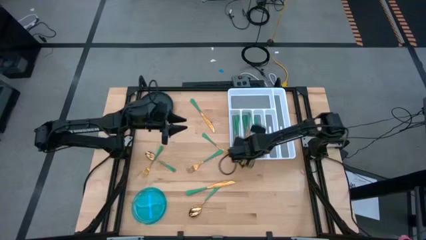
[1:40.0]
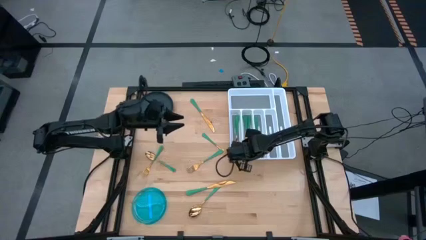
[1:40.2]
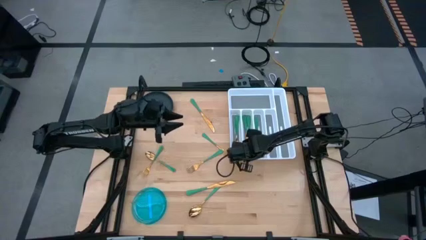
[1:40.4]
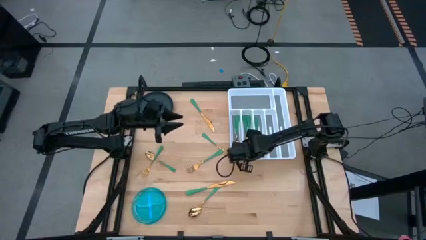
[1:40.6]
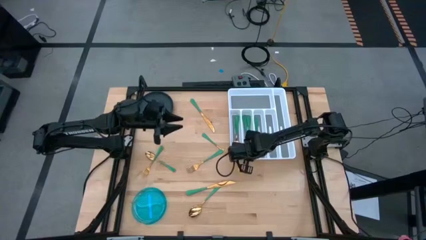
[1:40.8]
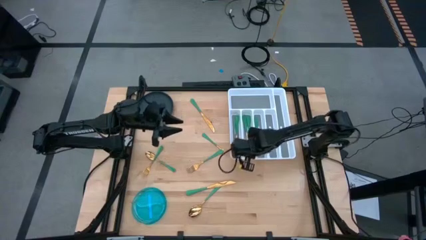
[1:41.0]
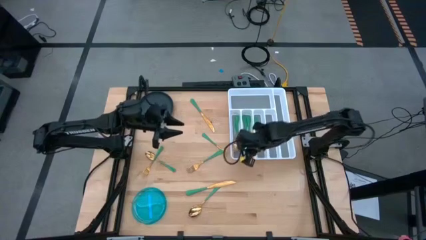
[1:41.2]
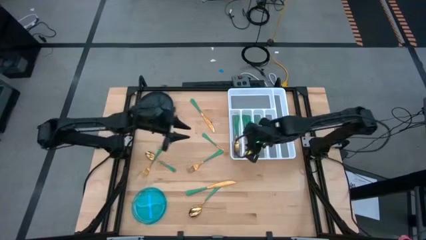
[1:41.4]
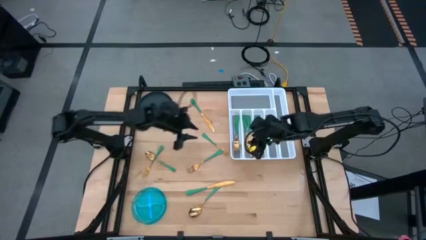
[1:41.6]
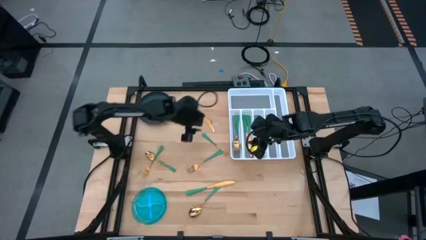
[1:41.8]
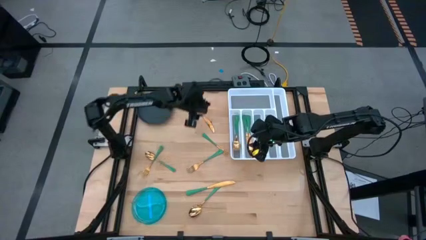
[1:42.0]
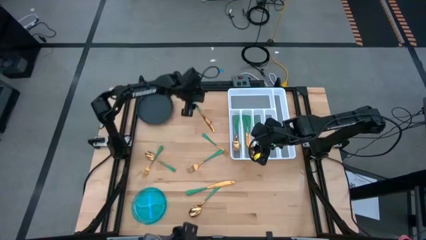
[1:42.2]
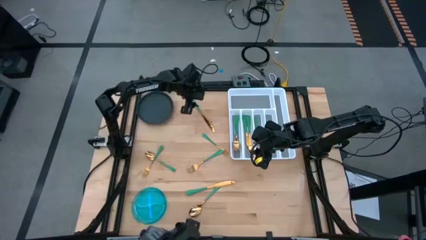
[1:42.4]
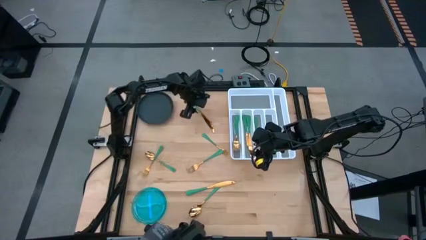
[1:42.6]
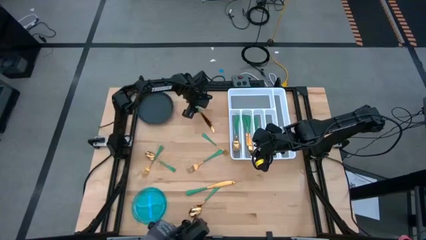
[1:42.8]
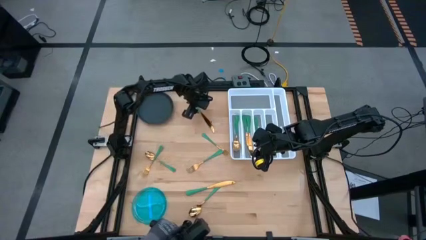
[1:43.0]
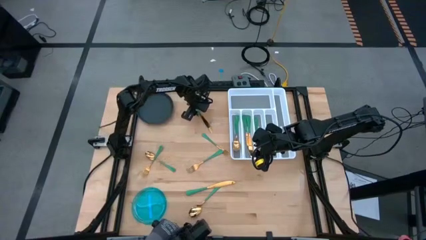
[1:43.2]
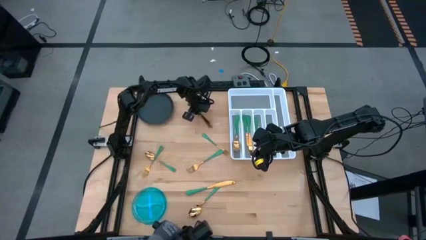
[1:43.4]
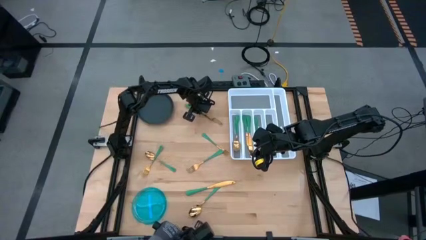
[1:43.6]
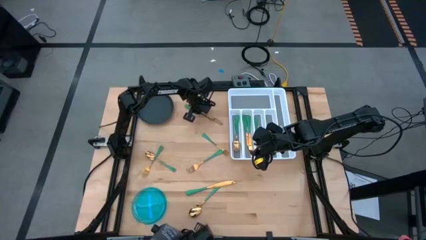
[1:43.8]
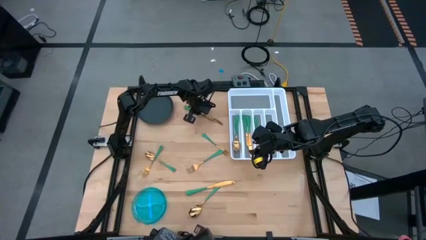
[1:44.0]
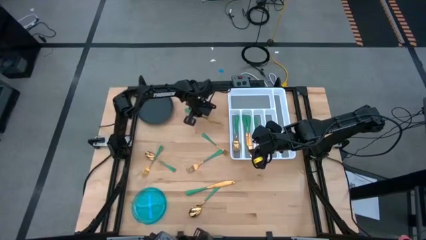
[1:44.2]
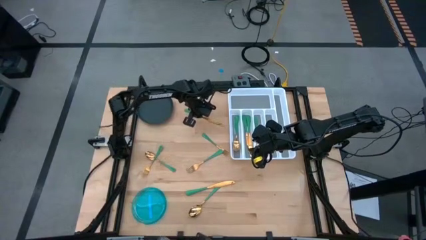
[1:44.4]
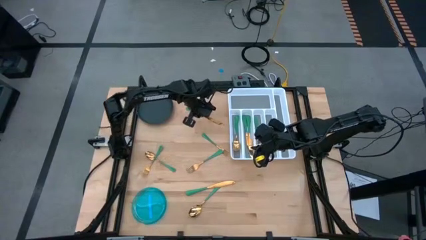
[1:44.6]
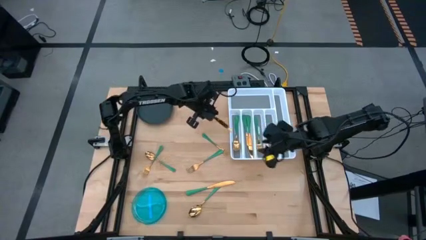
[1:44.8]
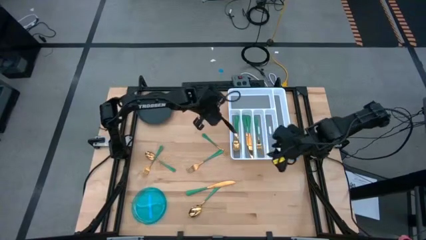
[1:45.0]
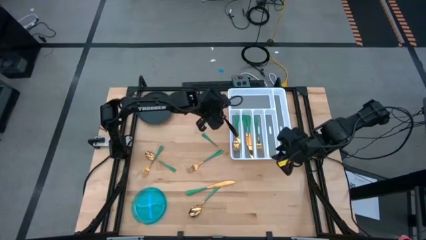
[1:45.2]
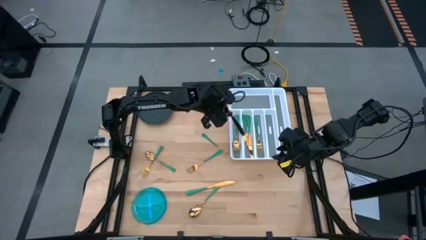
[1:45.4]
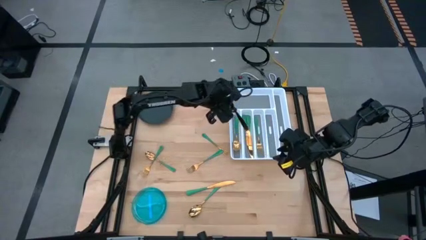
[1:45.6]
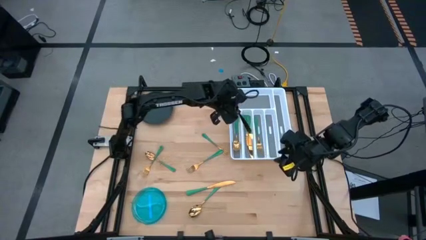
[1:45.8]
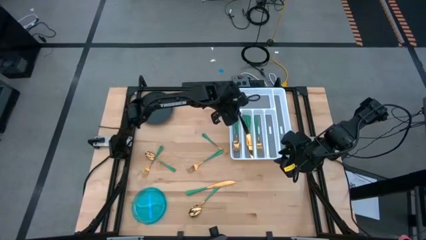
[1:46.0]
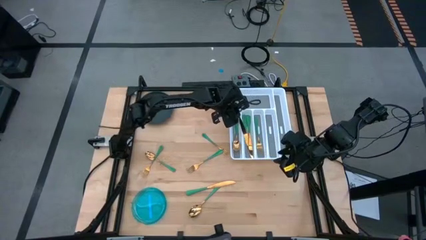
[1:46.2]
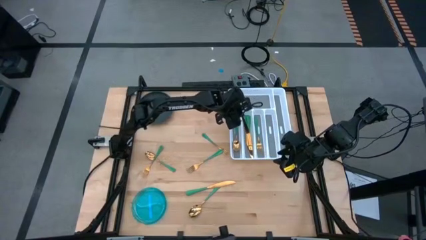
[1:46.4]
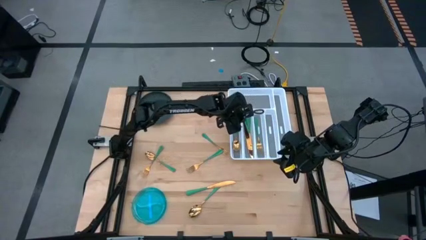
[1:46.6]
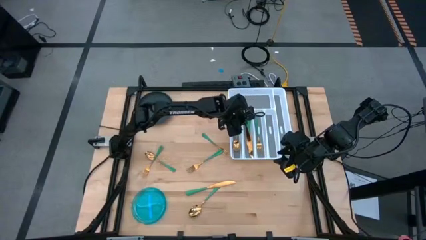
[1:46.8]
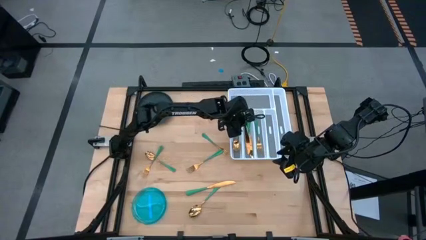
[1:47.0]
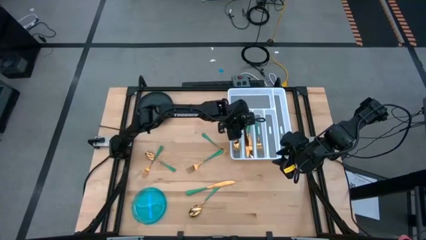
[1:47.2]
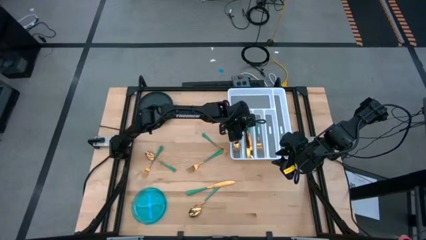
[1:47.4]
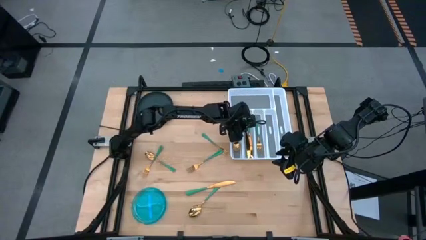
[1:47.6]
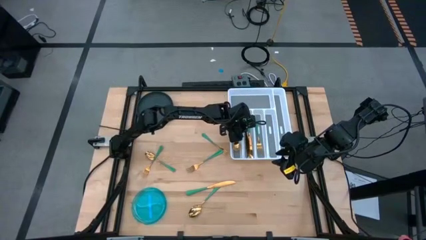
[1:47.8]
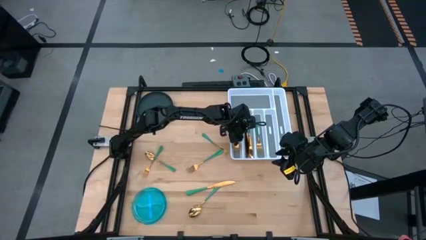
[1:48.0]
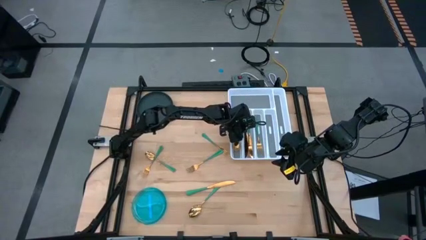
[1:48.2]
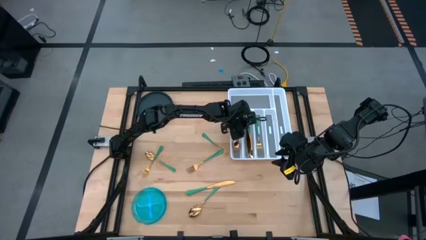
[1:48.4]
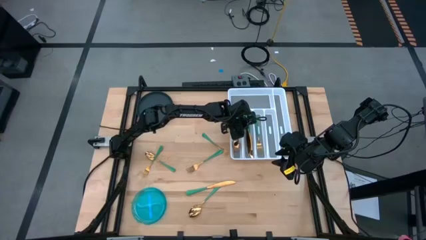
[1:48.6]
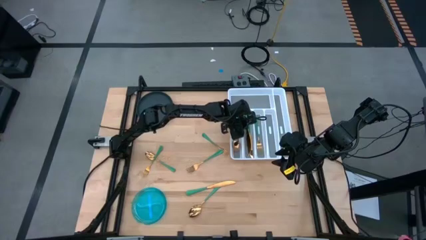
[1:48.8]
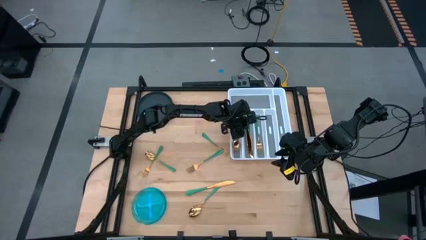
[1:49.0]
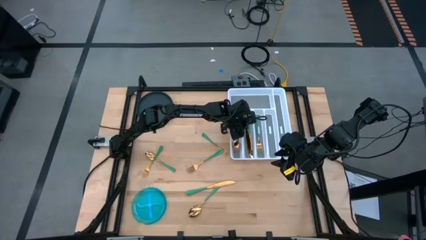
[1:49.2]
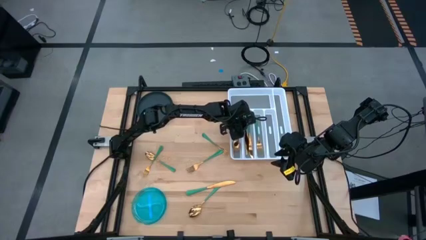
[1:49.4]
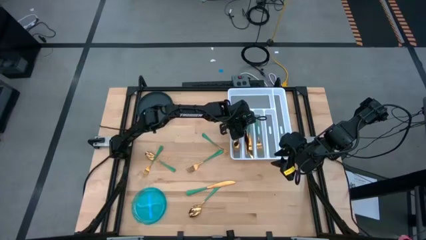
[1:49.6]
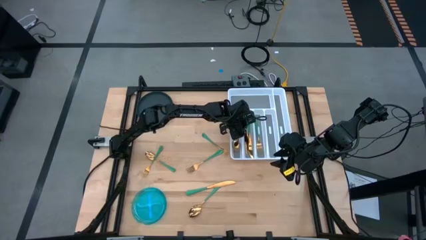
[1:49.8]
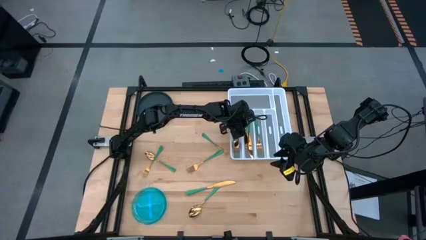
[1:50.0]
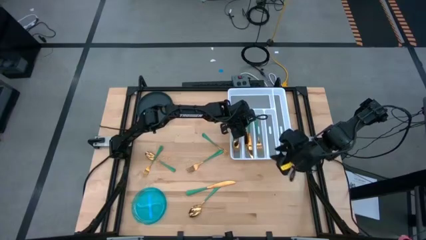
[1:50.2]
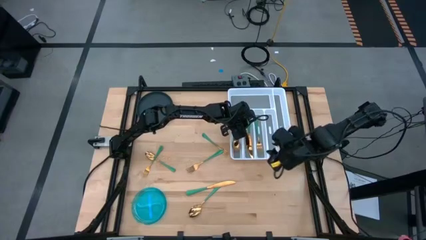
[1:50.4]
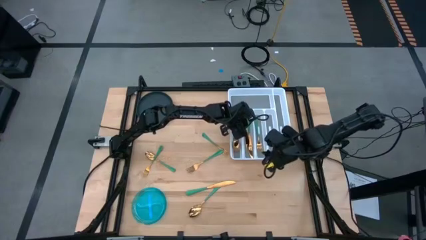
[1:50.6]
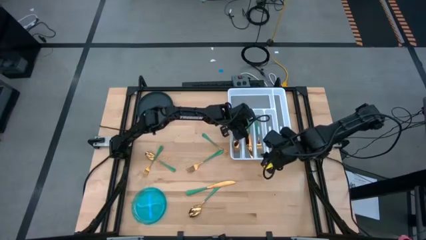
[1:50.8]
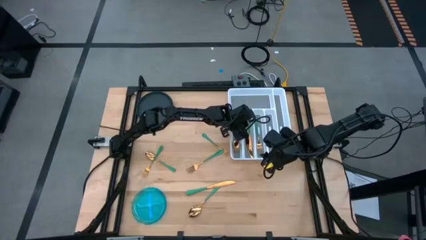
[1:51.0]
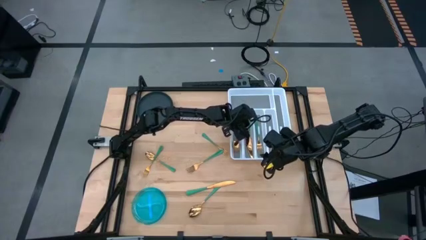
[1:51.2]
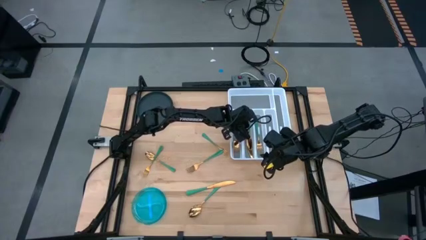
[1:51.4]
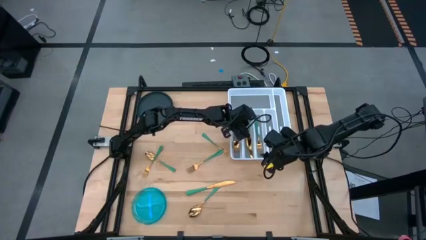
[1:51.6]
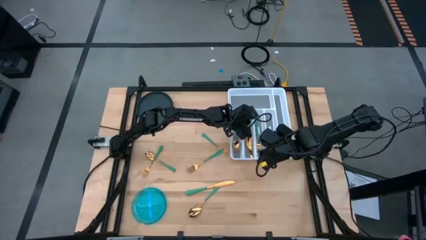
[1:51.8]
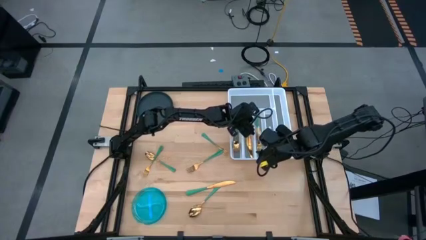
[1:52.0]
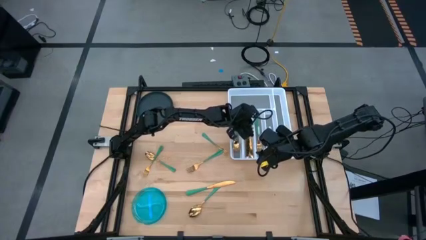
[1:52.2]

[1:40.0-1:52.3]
Task: Sort silverware
Put the top green table knife into the middle left slot of the white silverware tray
